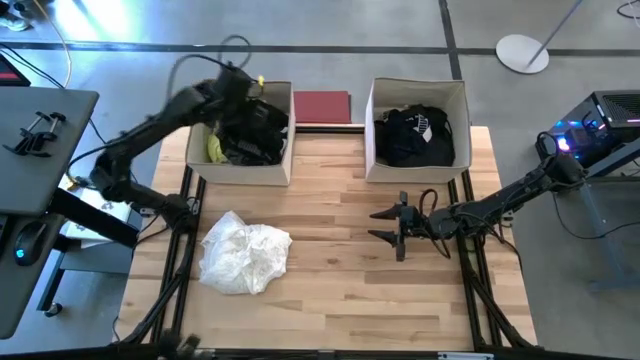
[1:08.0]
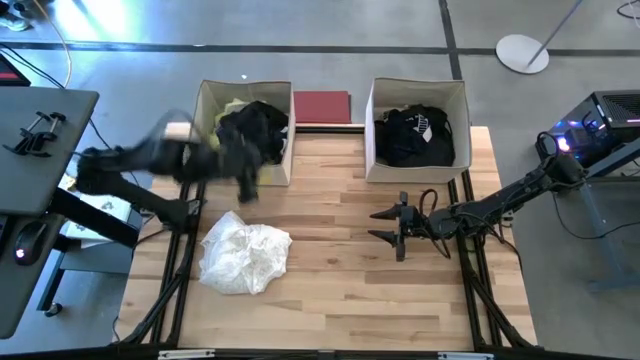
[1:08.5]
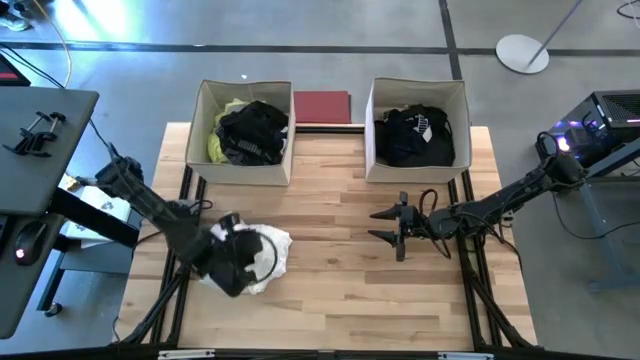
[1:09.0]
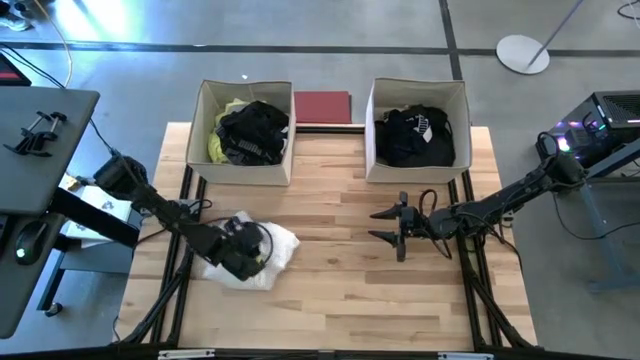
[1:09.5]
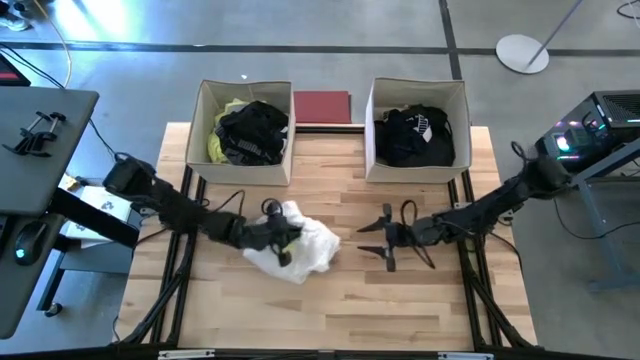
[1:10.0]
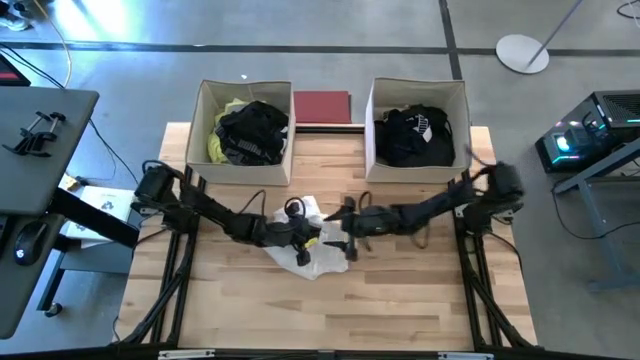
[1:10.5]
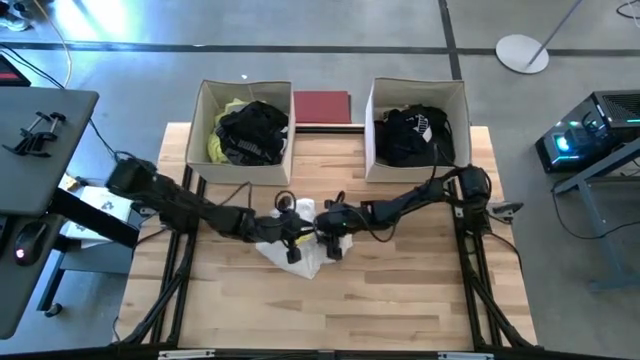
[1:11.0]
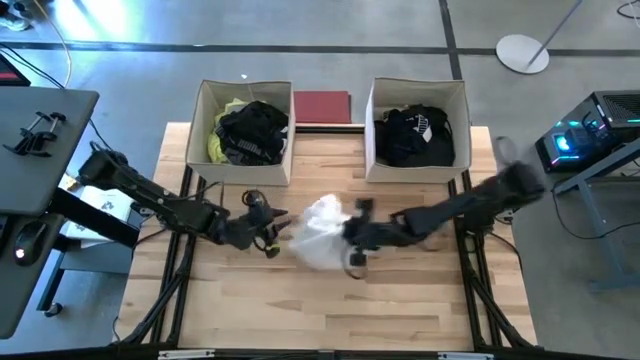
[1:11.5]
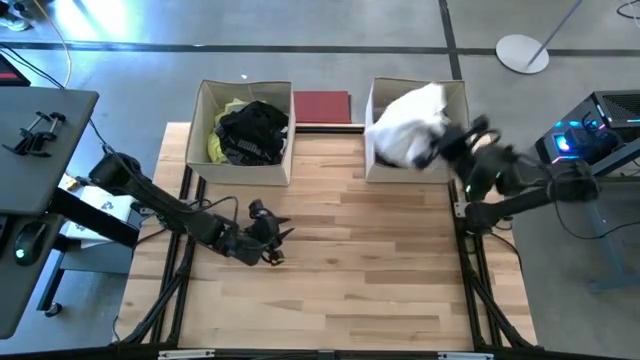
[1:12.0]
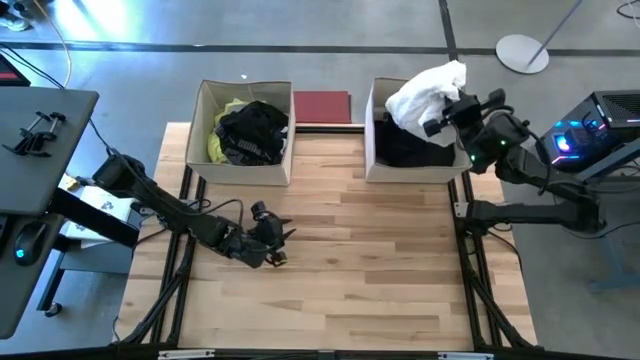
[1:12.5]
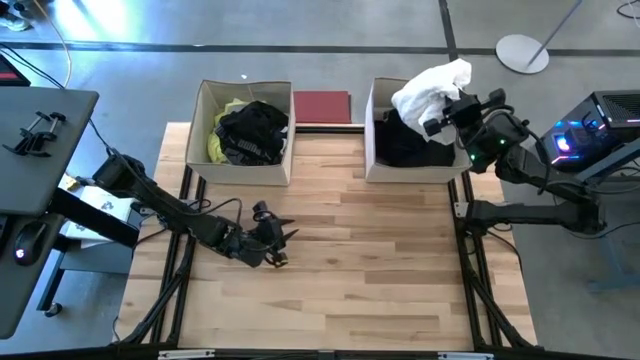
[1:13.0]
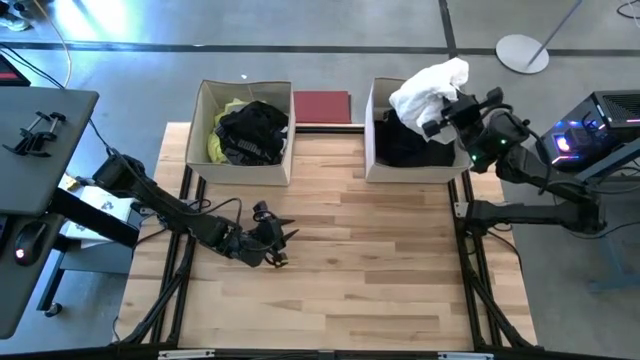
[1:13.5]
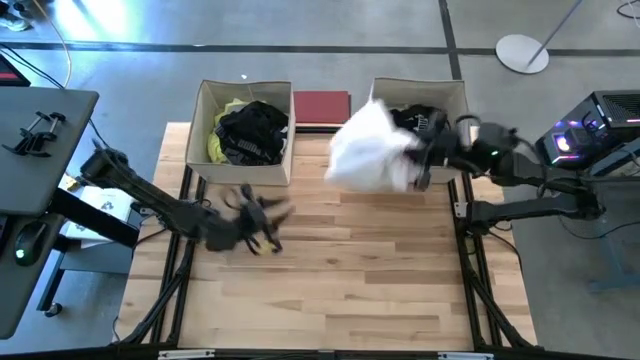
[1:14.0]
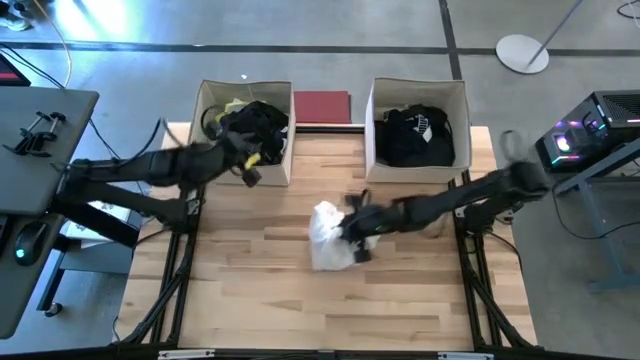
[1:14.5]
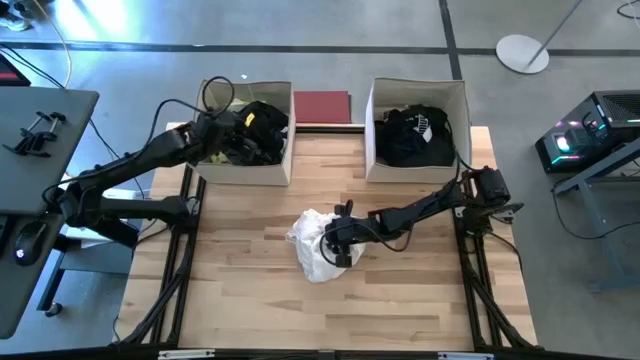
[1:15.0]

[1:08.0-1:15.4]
Task: Sort clothes
Put the left white cloth into the right brown laundry organizer

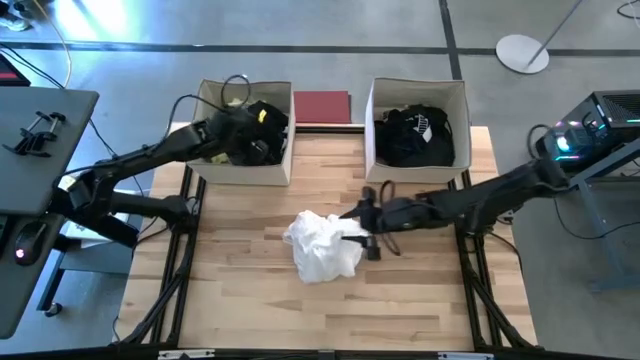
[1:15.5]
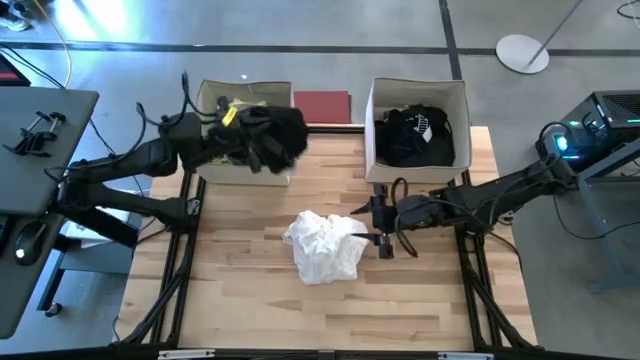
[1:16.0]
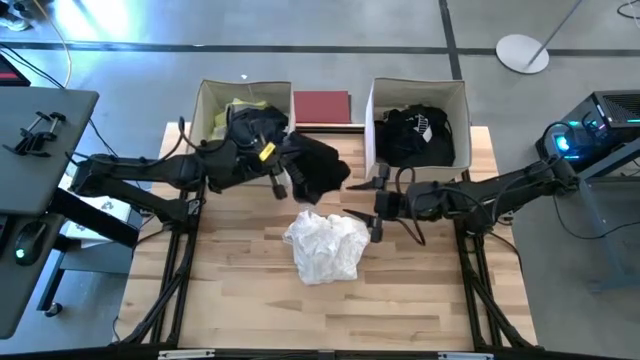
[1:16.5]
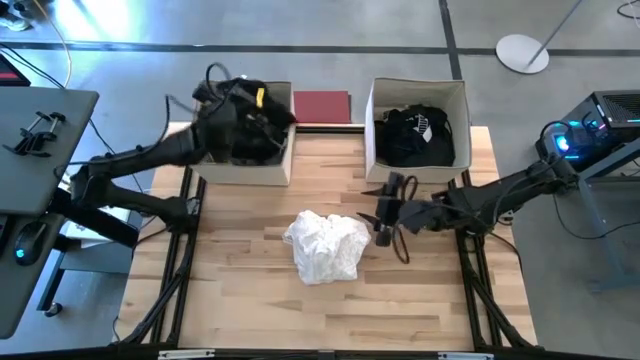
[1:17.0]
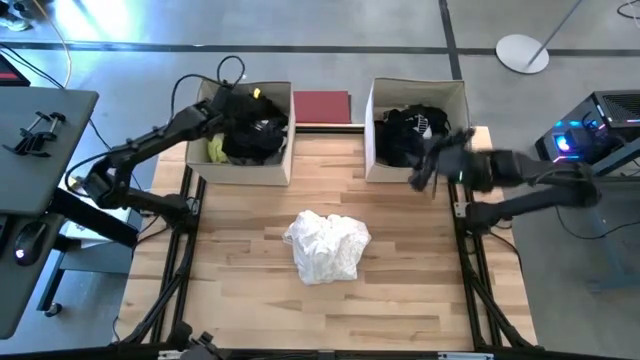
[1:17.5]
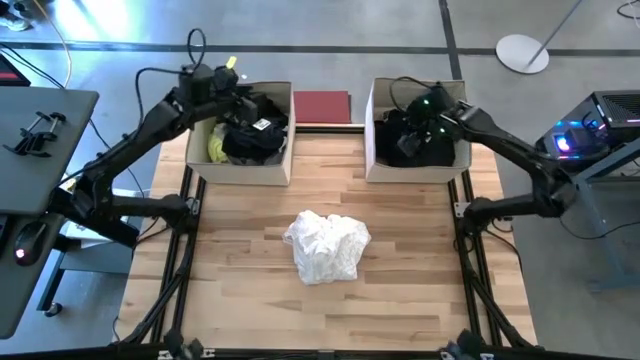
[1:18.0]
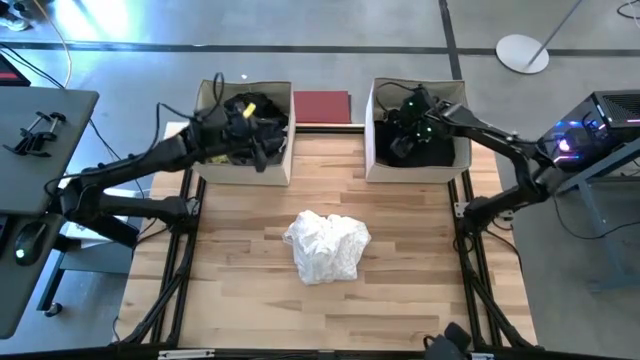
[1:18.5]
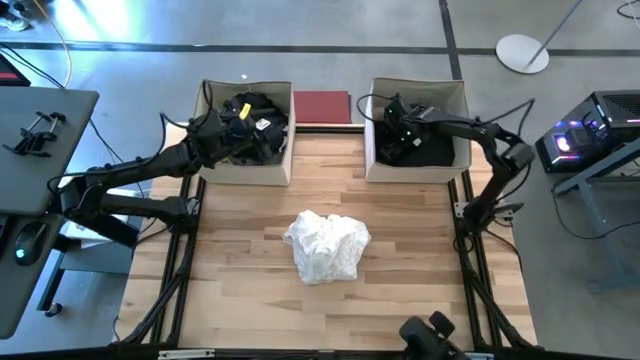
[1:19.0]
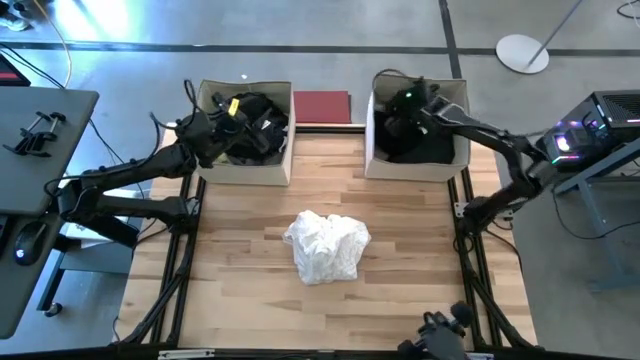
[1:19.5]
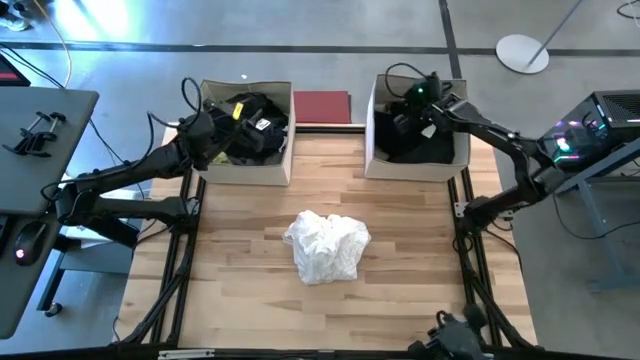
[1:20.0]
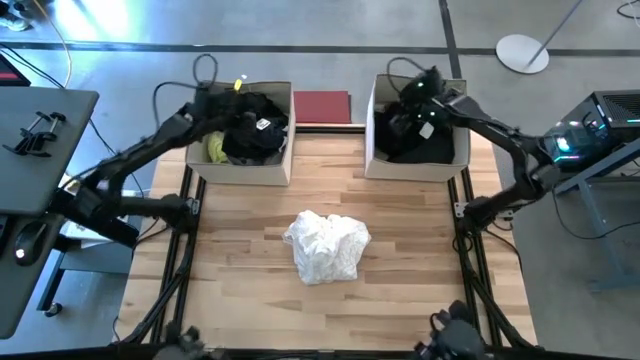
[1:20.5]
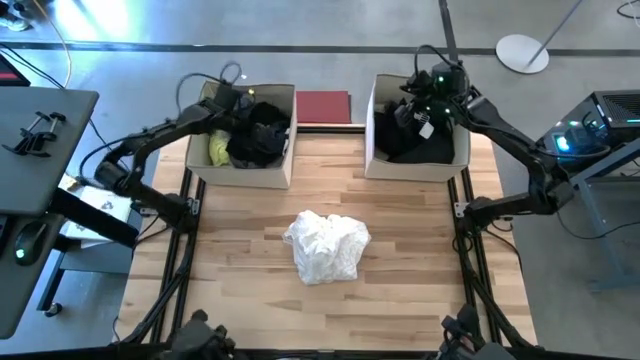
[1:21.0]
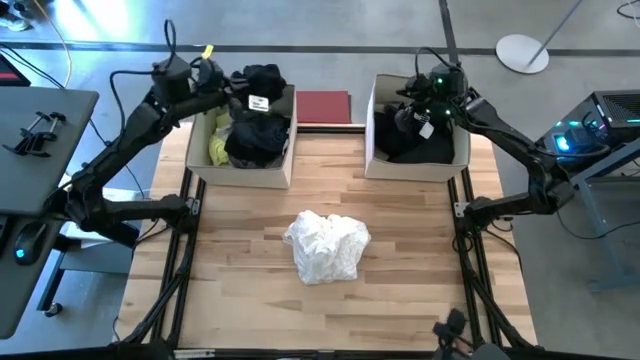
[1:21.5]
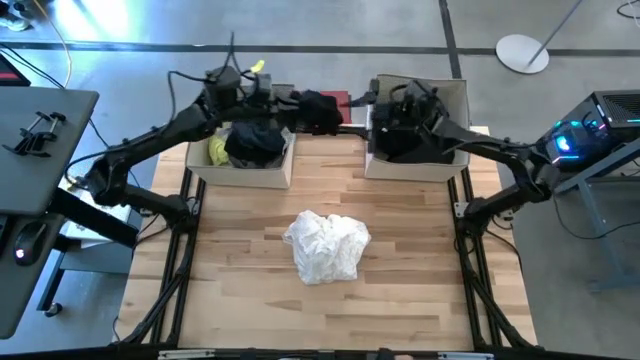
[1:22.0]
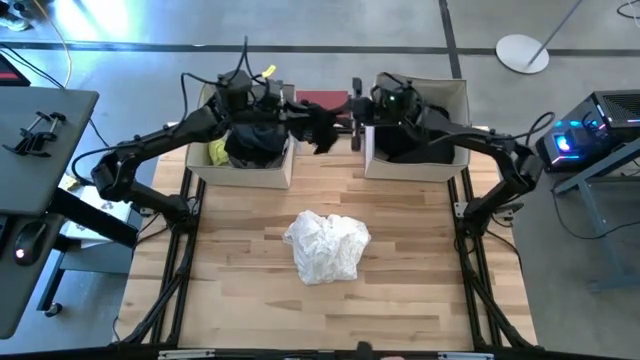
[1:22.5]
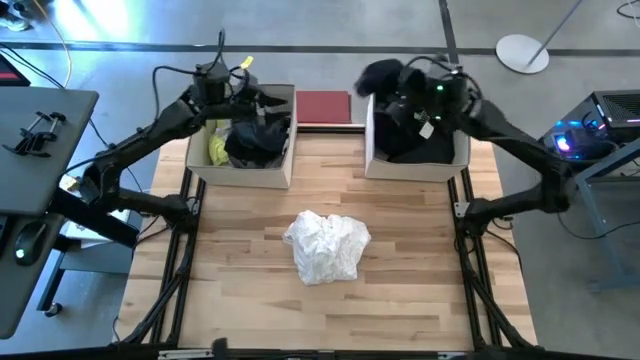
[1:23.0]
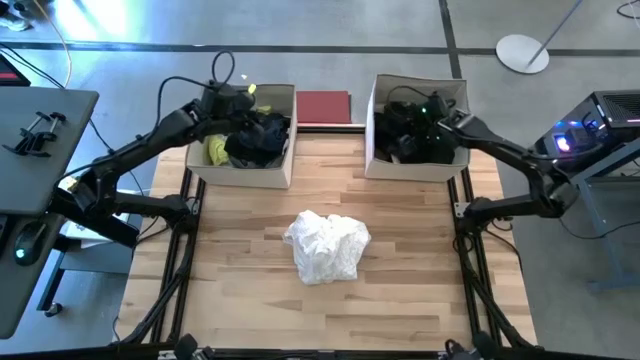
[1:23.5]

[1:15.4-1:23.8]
Put the black boxers from the left brown laundry organizer into the right brown laundry organizer

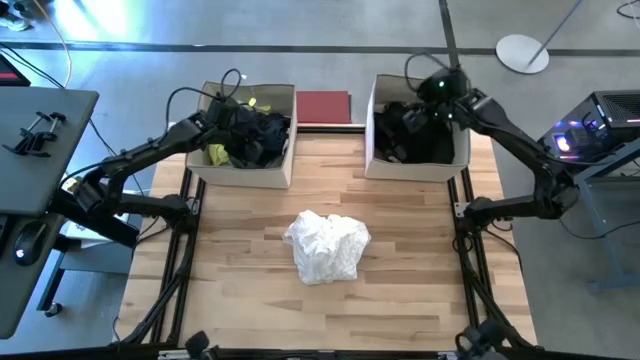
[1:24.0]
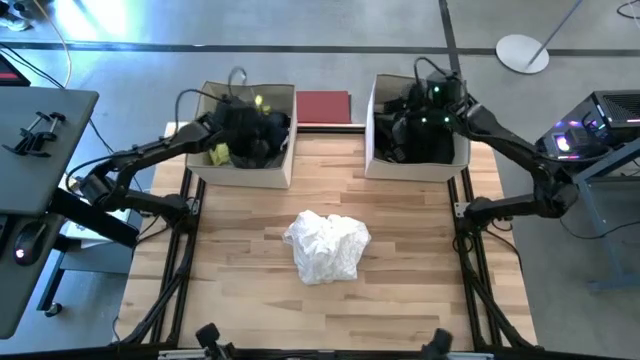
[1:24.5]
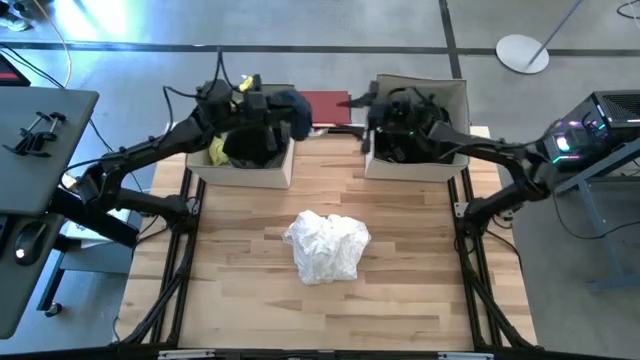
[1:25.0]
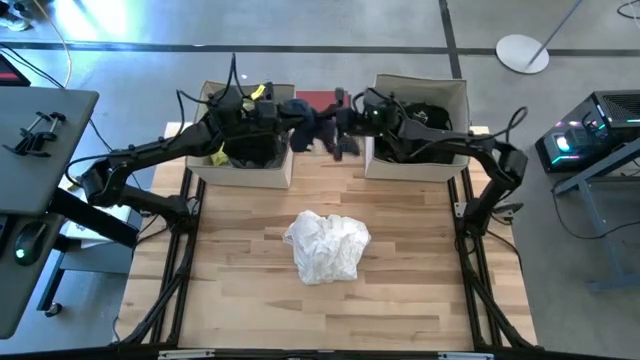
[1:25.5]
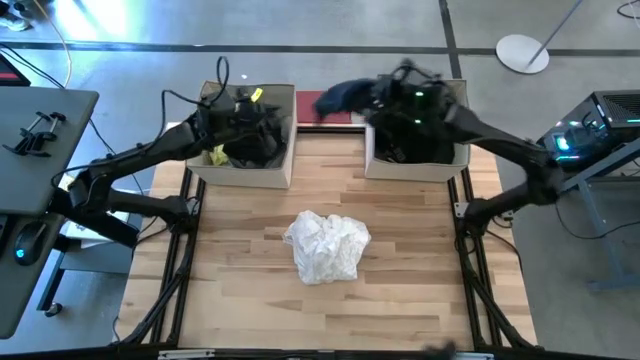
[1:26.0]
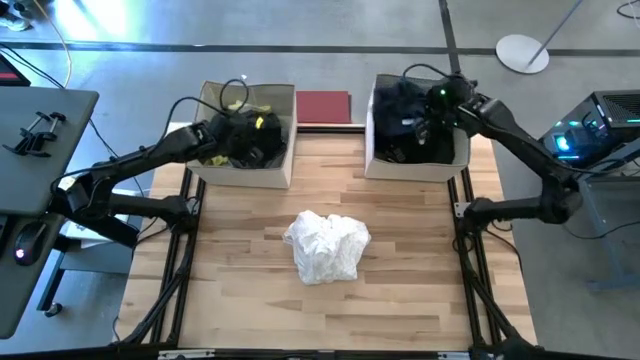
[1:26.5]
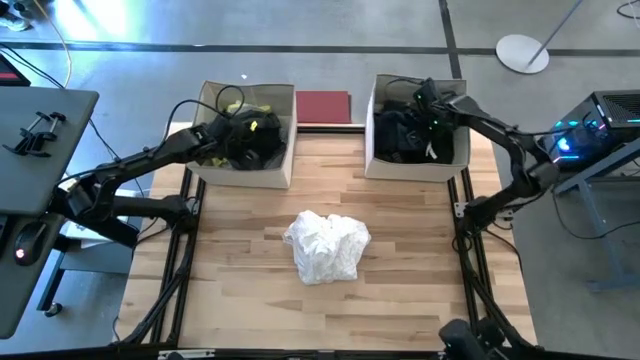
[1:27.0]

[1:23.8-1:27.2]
Put the grey piece of clothing from the brown left laundry organizer into the right laundry organizer

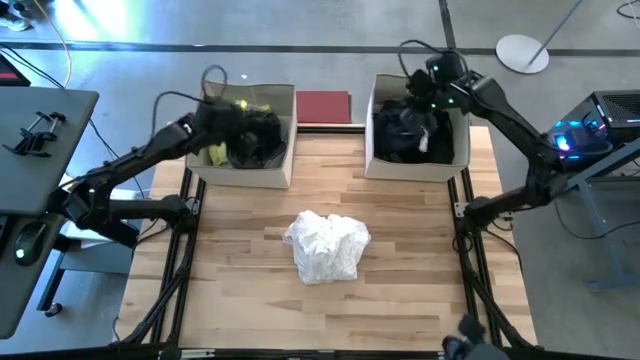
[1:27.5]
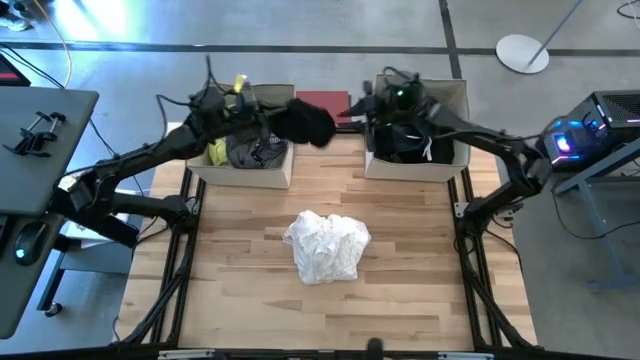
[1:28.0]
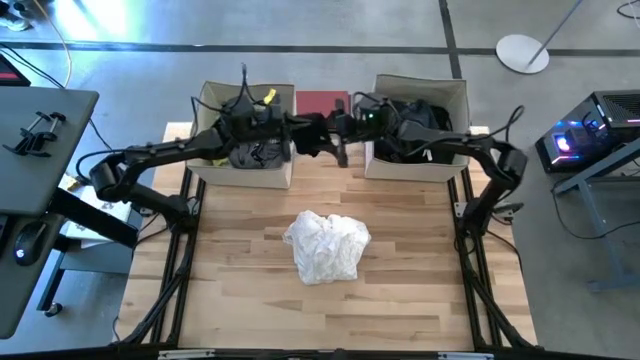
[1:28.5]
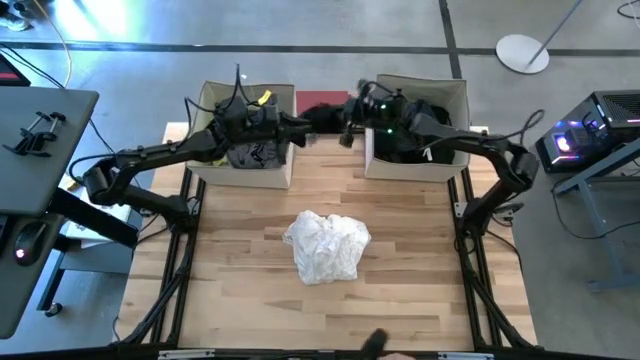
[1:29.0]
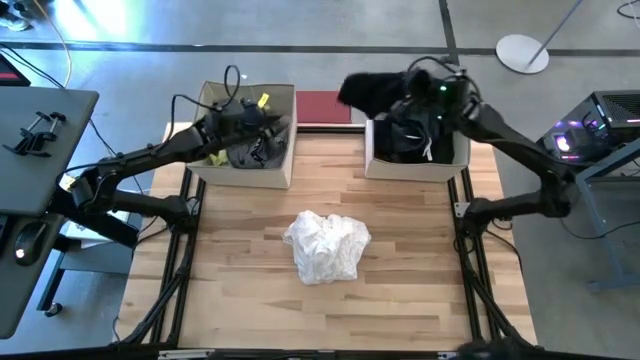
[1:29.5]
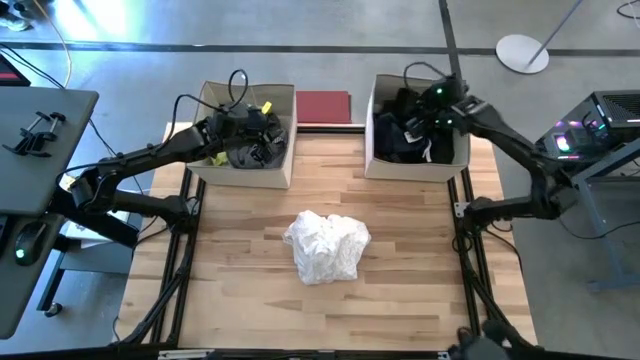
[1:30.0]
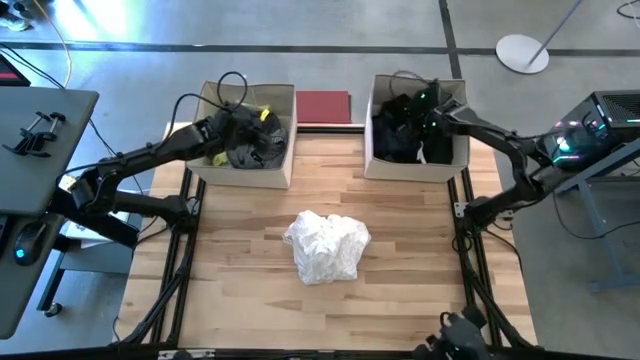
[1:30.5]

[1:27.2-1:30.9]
Put the black piece of clothing from the left brown laundry organizer into the right brown laundry organizer
